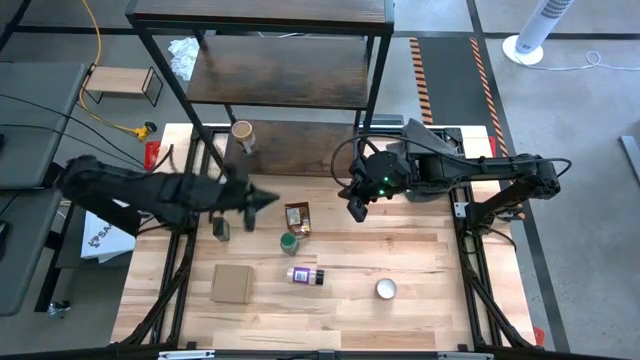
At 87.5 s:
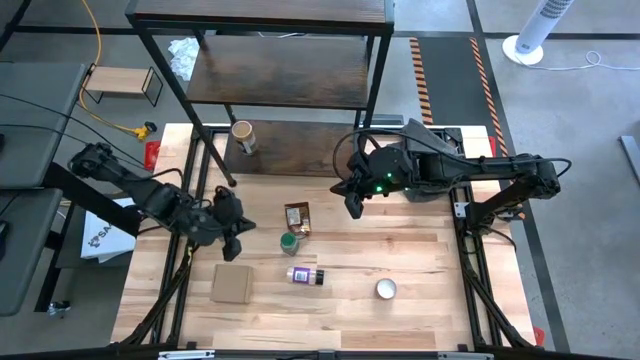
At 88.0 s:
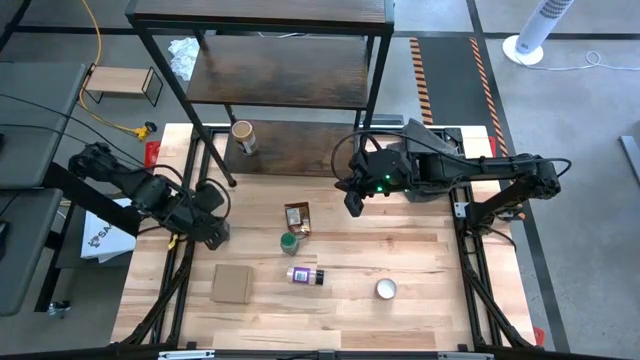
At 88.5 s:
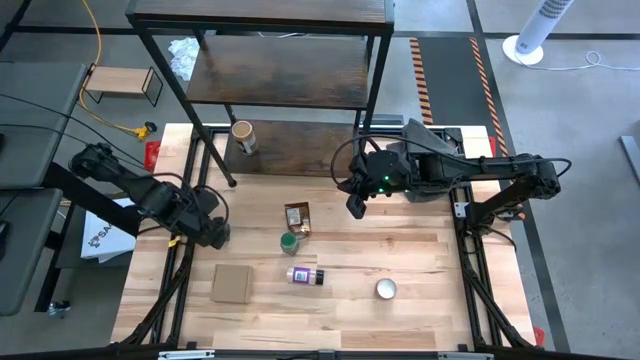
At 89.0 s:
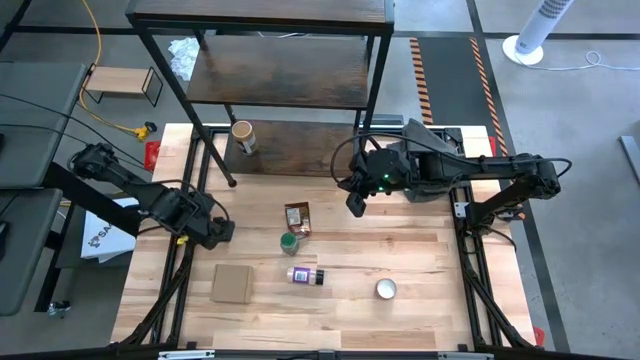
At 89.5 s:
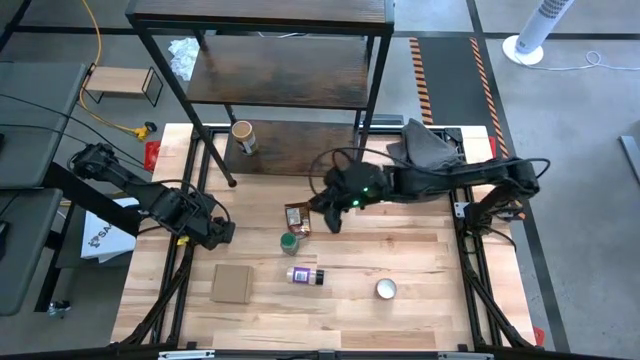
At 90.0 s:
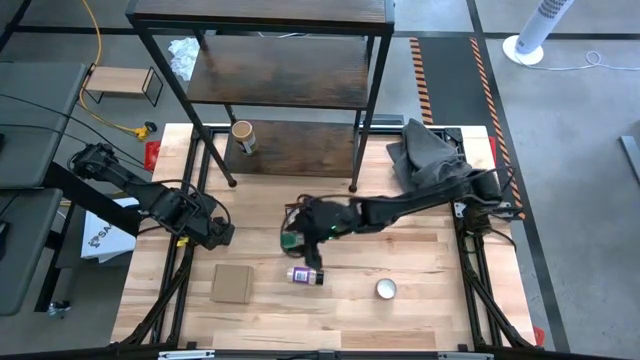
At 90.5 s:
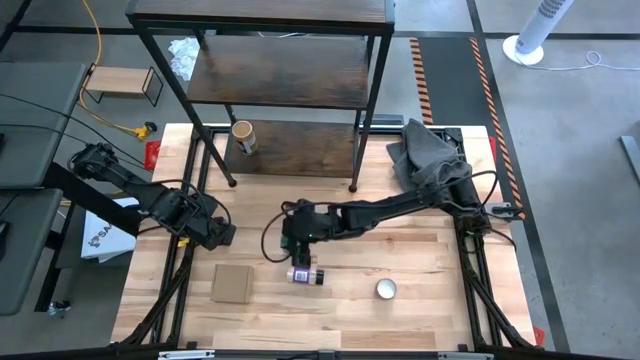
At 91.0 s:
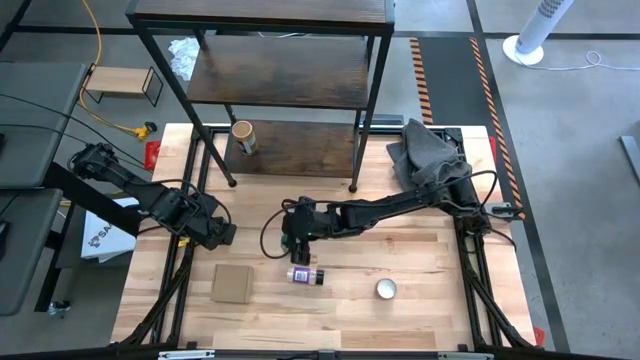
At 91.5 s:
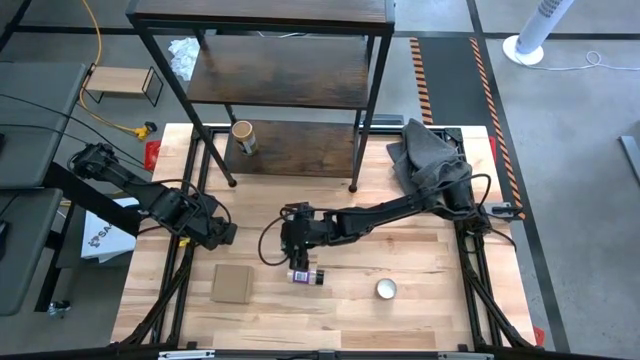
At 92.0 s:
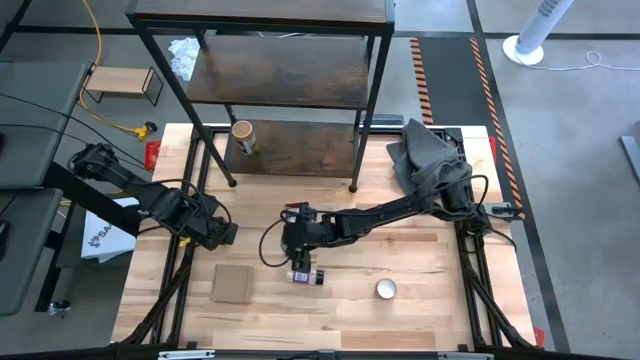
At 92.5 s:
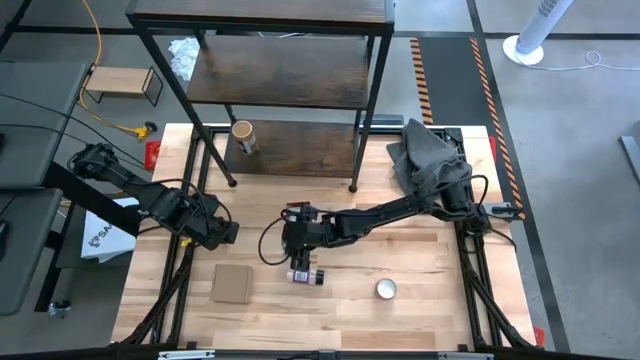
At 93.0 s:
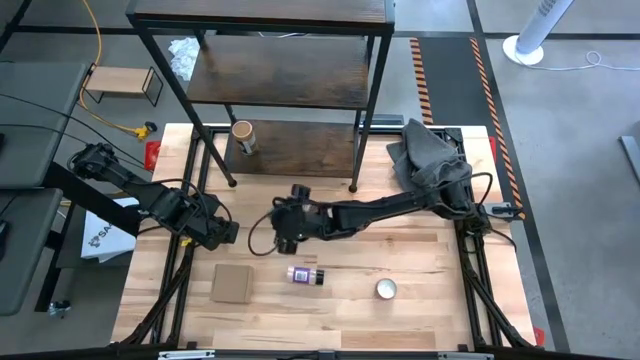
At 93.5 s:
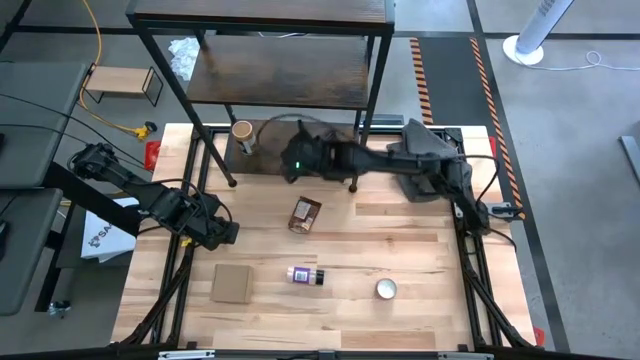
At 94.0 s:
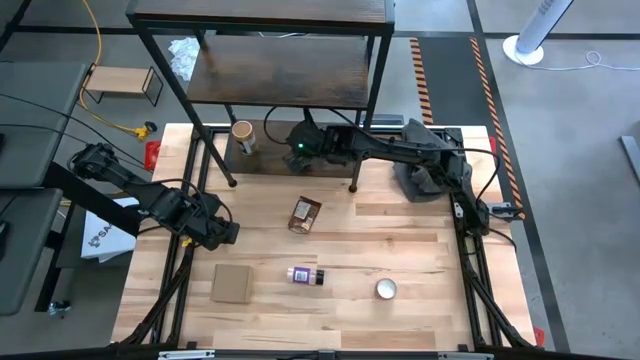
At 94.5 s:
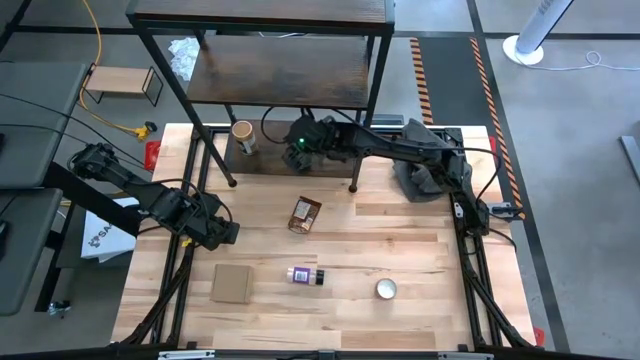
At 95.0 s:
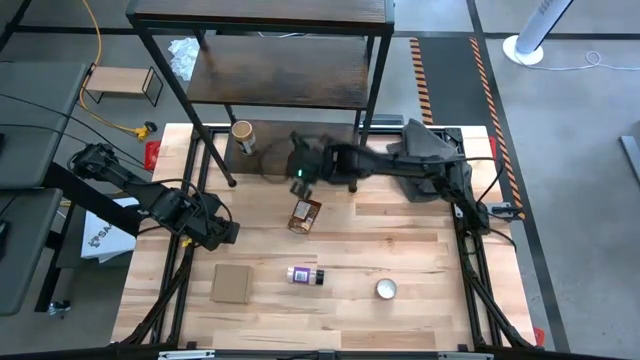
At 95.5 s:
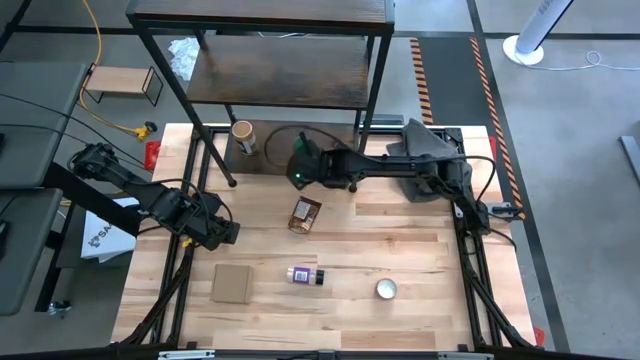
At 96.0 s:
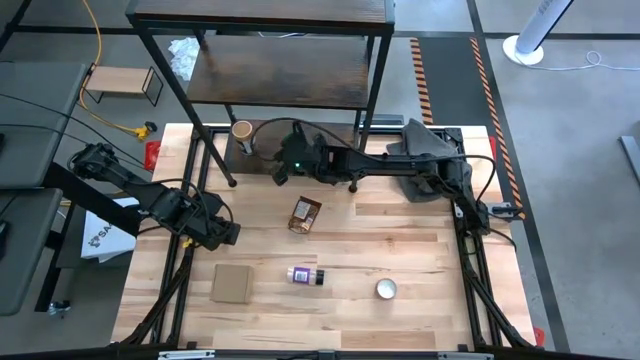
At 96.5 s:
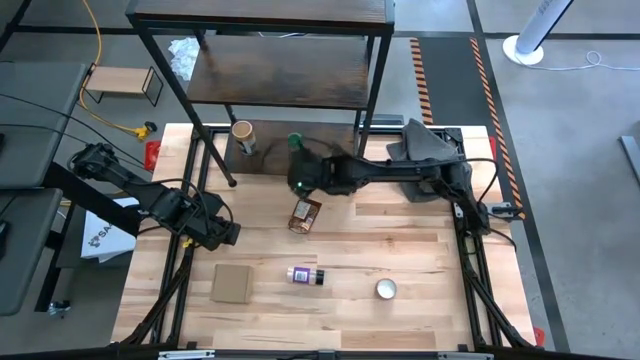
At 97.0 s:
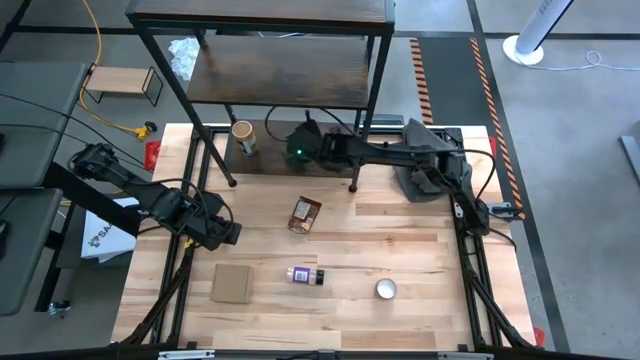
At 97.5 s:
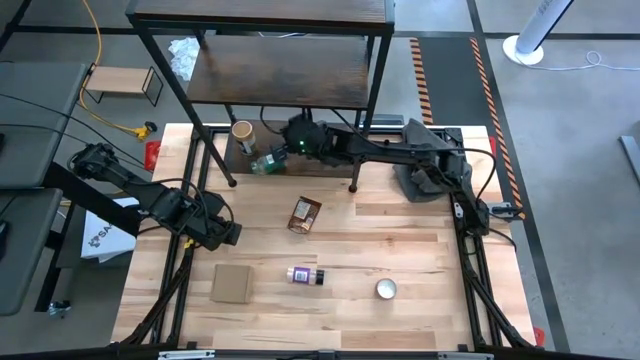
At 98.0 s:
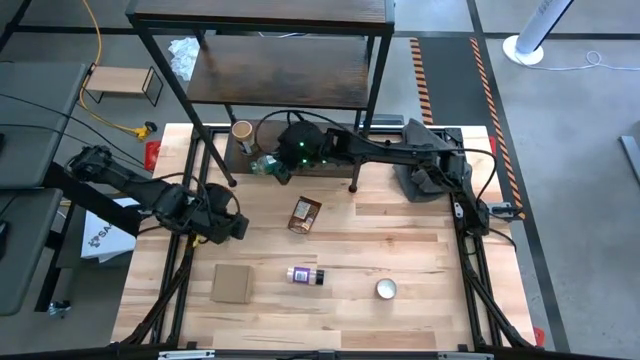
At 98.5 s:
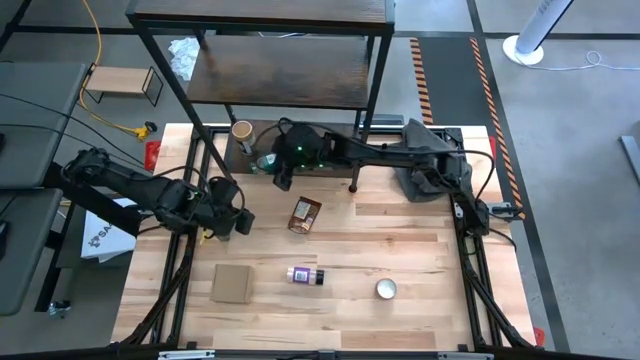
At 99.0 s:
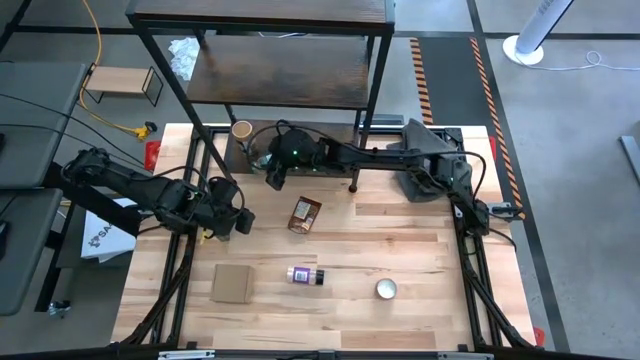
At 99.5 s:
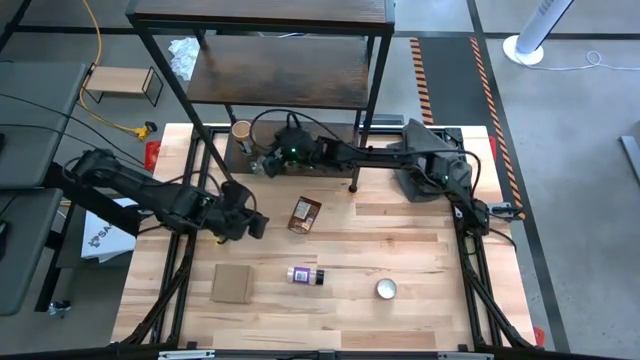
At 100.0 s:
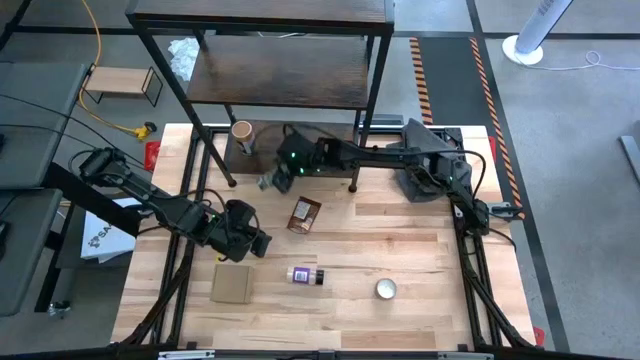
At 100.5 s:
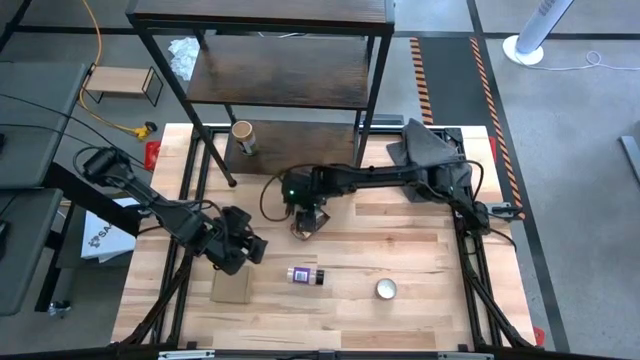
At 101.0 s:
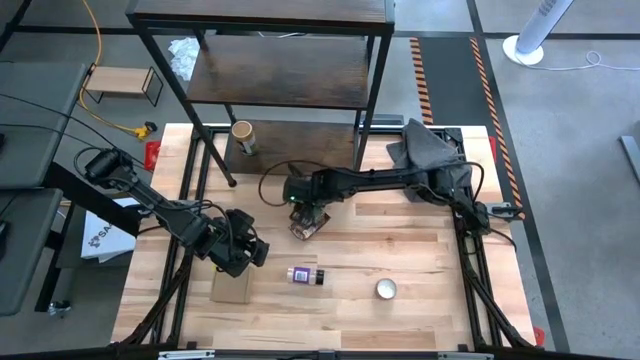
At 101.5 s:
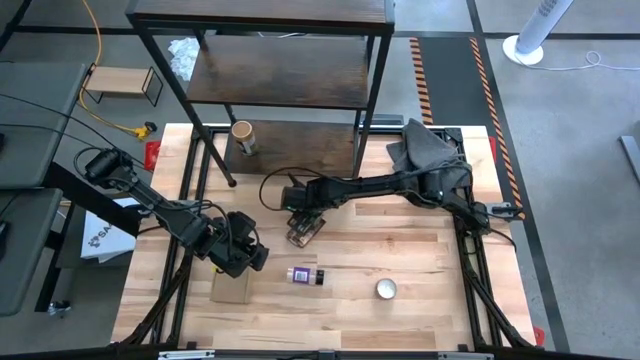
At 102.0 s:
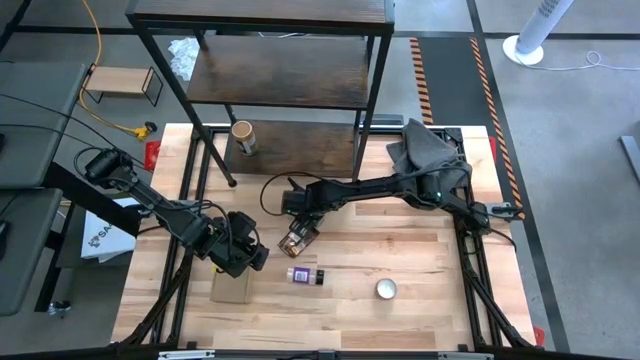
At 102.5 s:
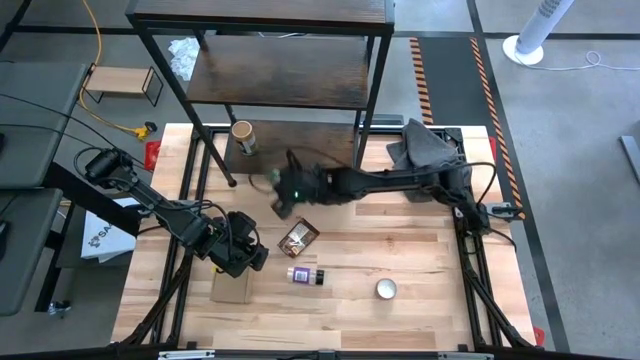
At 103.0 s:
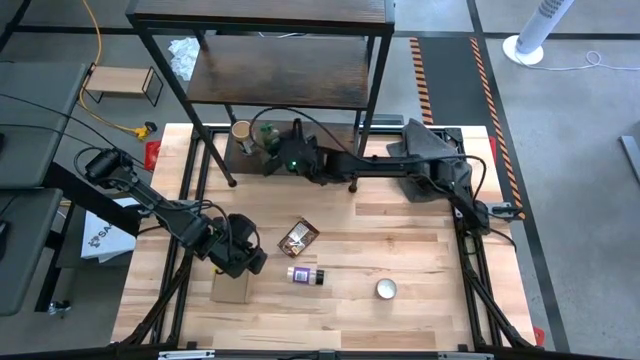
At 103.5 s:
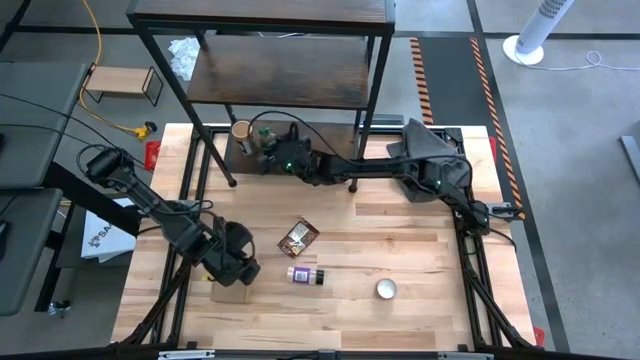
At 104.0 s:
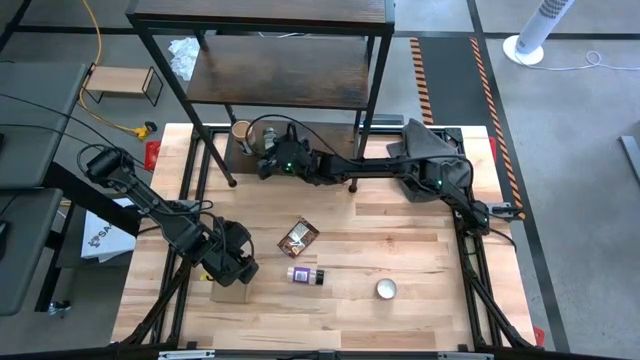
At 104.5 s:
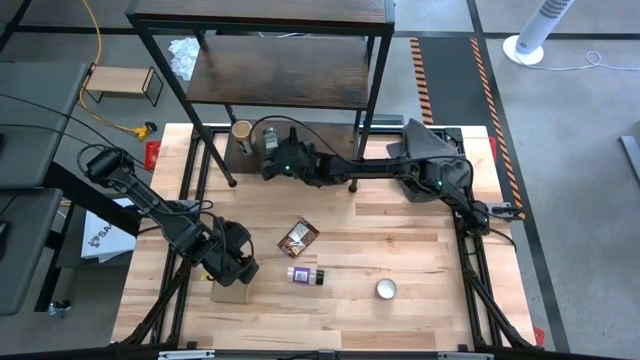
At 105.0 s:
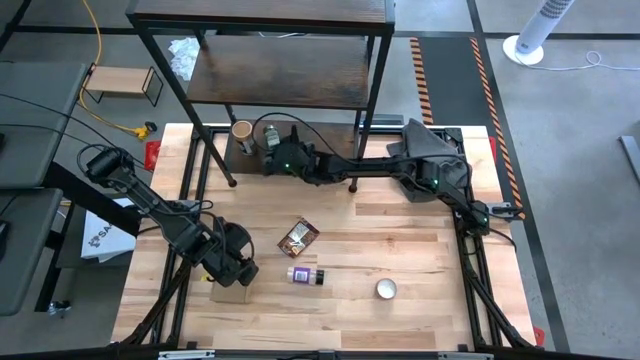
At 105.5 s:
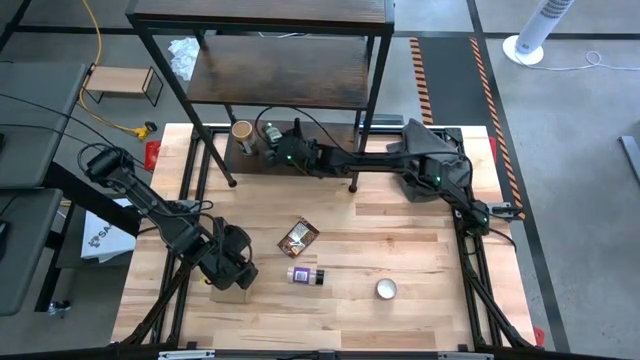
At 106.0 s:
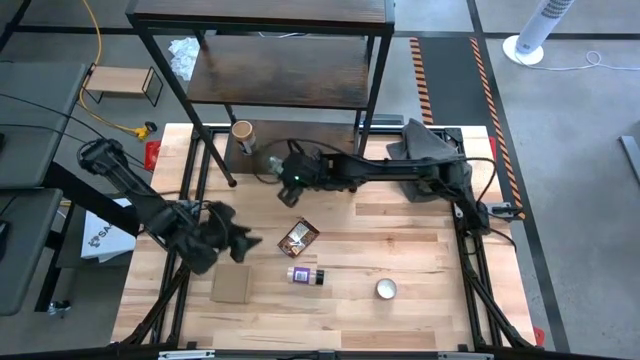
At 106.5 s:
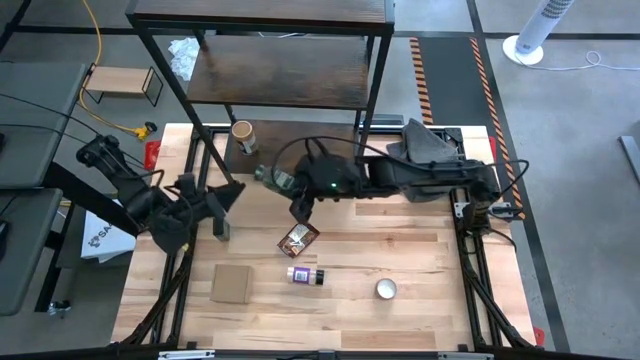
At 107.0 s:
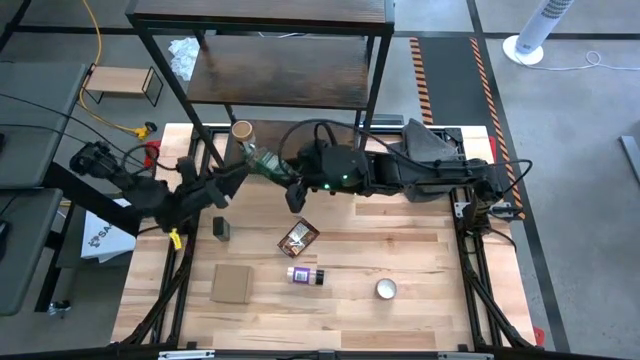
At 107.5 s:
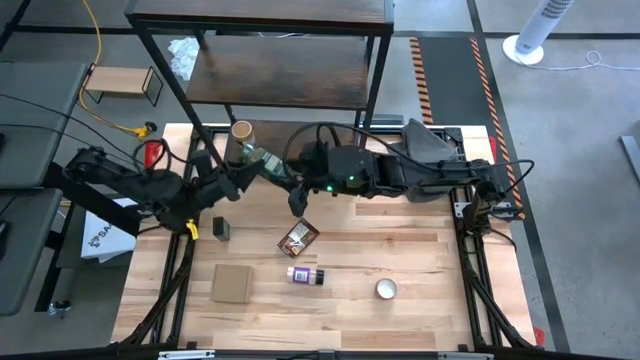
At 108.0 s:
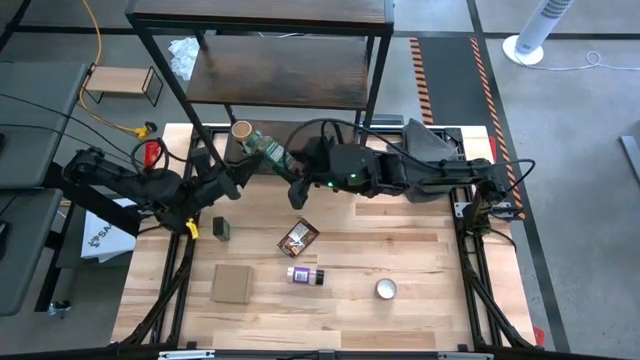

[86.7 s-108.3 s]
Task: Shelf spices
Put the green seasoning bottle on the shelf
